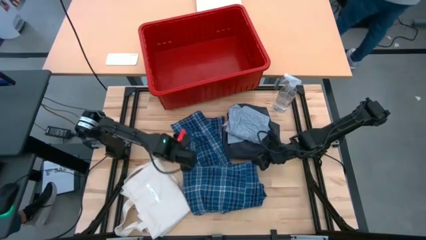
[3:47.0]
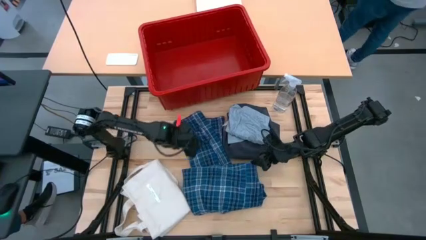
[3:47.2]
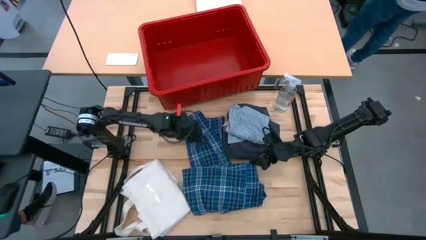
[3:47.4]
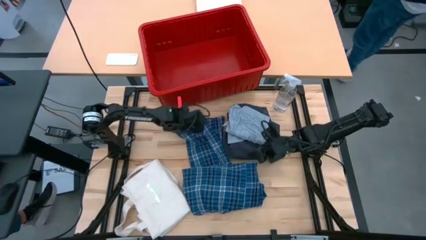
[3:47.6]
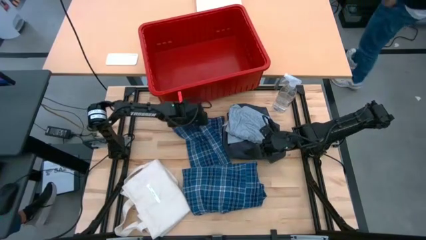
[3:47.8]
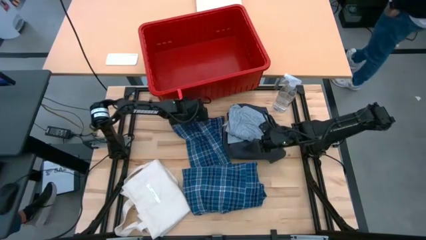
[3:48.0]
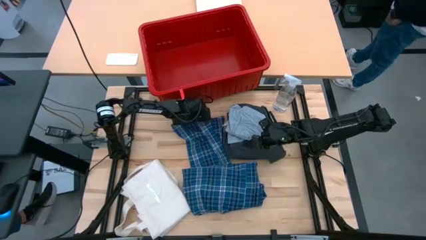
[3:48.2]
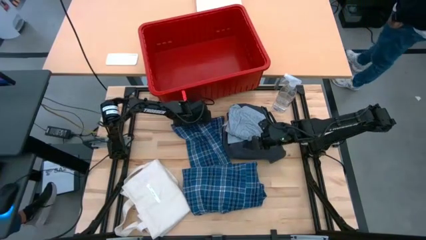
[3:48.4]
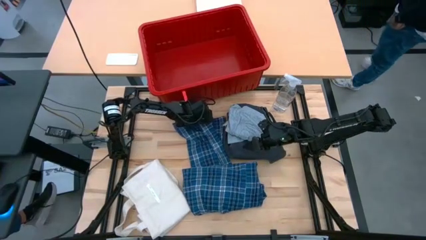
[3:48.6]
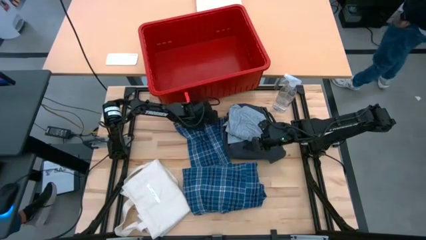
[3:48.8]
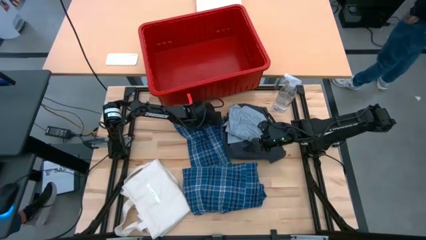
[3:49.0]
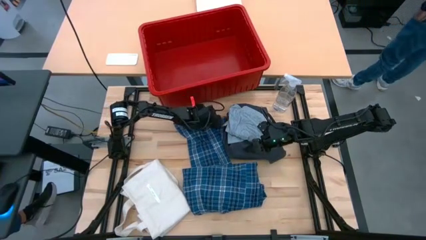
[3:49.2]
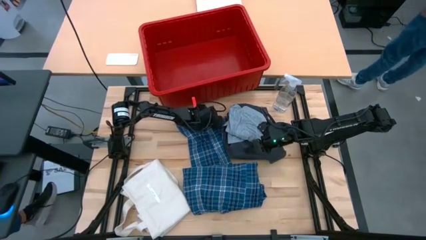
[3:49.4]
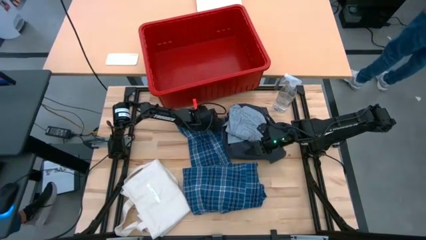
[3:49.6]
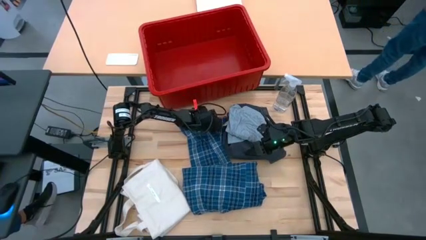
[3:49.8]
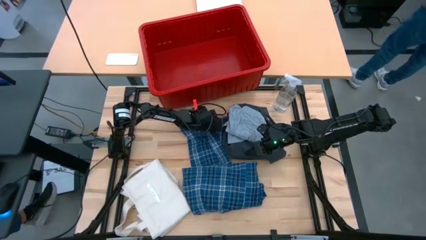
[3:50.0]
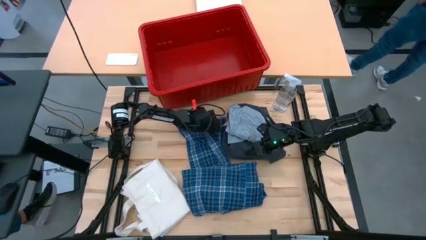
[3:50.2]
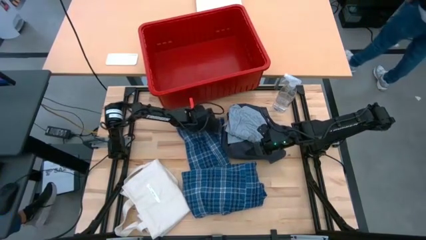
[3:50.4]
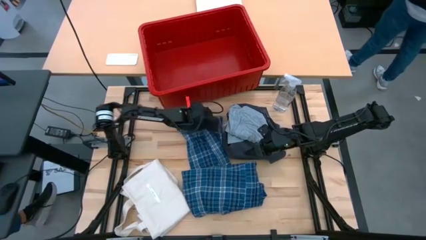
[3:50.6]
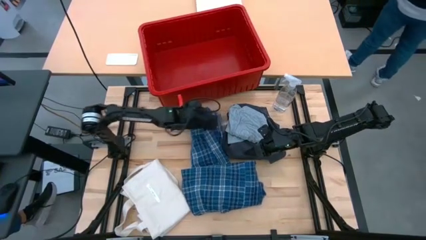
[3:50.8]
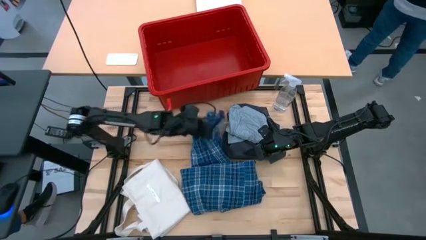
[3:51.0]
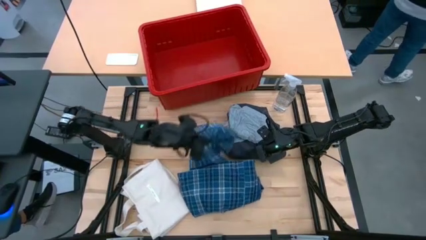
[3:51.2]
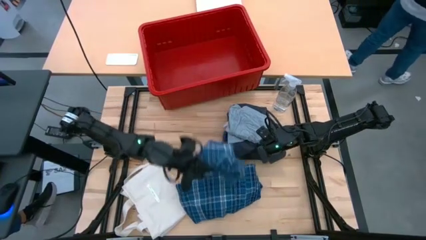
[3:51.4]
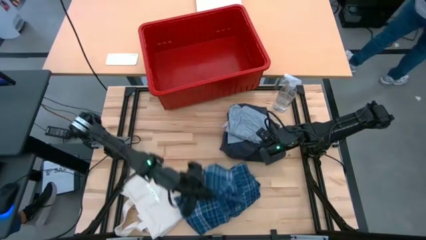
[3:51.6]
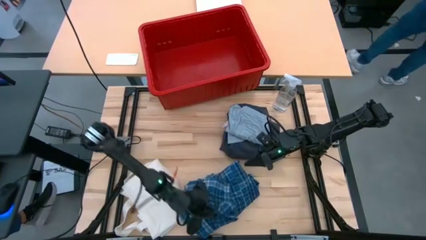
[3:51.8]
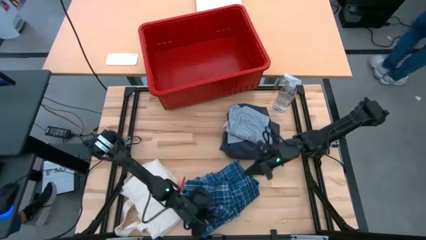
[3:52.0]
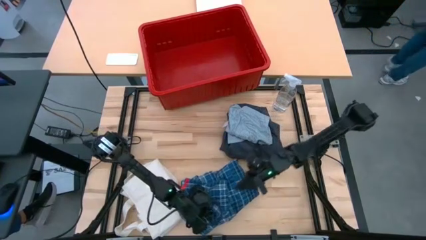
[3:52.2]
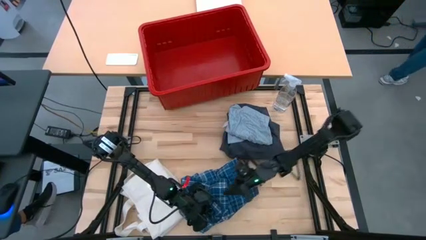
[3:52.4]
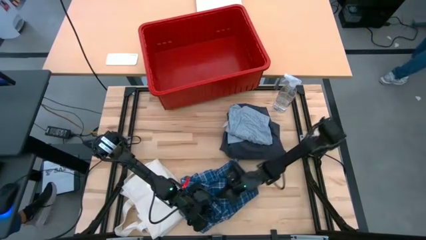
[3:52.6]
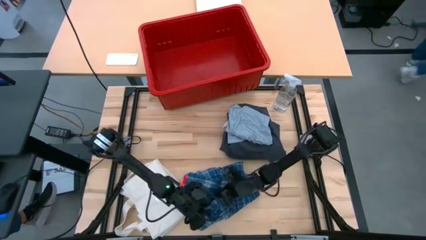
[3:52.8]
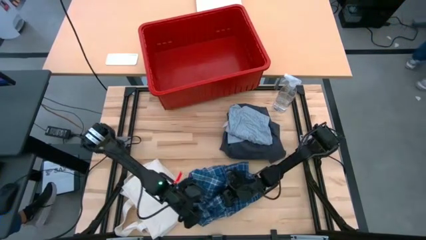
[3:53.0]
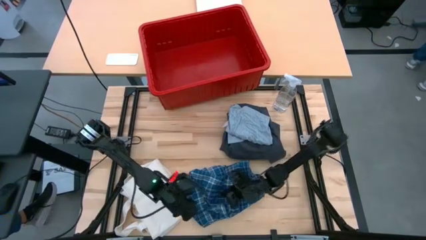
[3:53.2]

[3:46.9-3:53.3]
Task: Fold Laundry from Bin
Fold the blue striped long sleeve

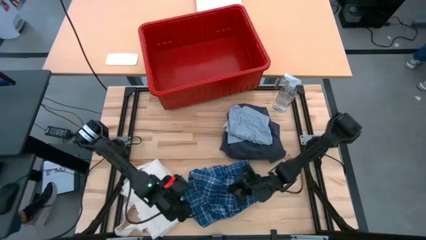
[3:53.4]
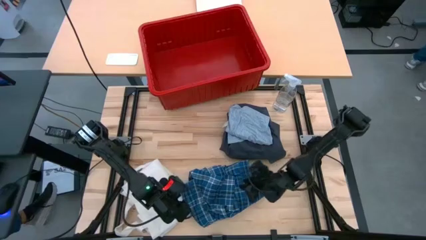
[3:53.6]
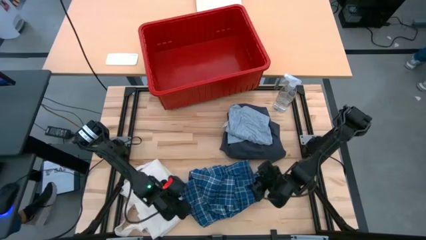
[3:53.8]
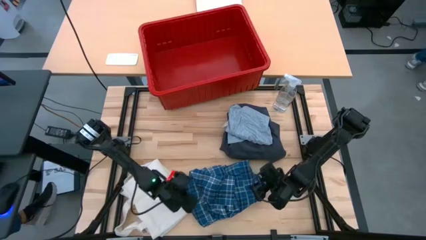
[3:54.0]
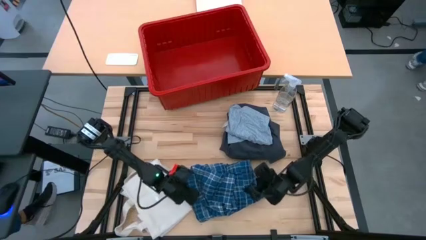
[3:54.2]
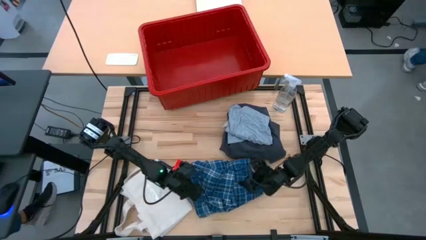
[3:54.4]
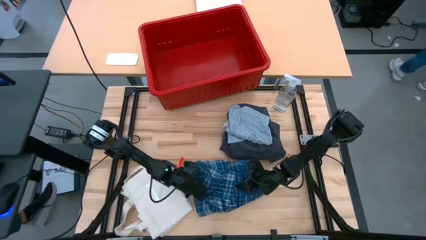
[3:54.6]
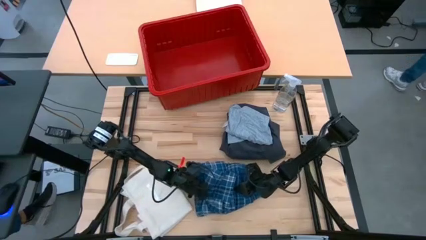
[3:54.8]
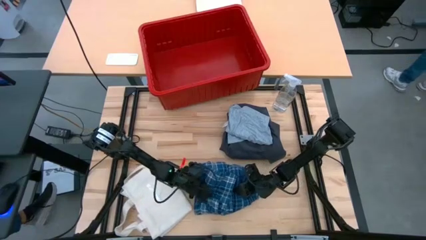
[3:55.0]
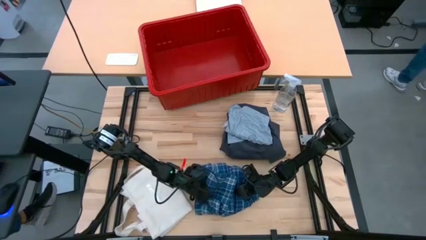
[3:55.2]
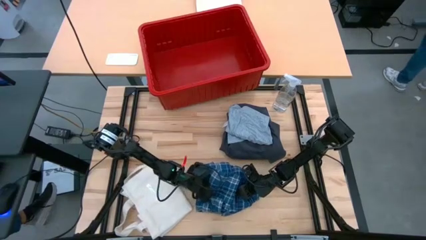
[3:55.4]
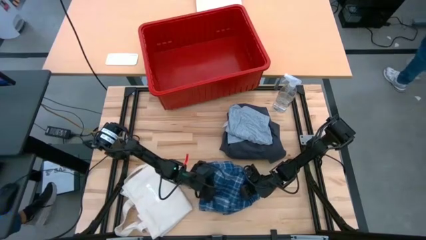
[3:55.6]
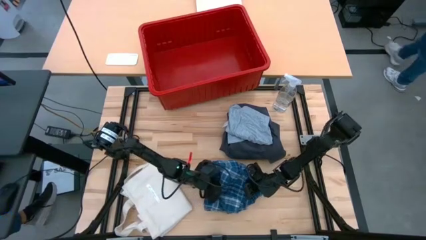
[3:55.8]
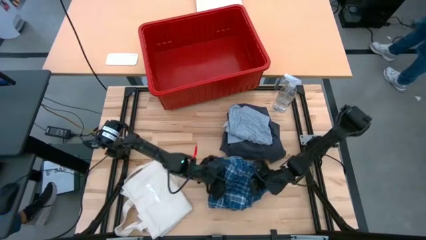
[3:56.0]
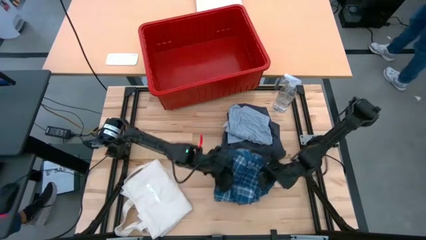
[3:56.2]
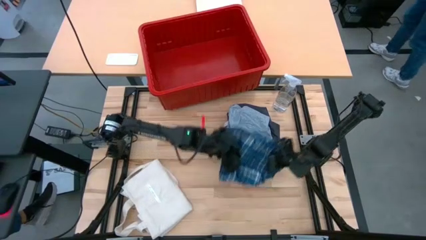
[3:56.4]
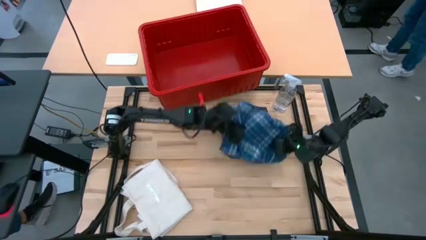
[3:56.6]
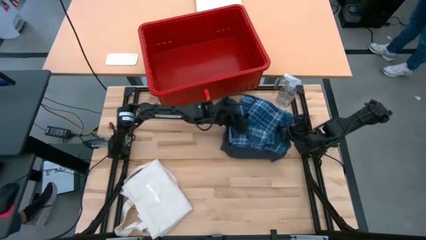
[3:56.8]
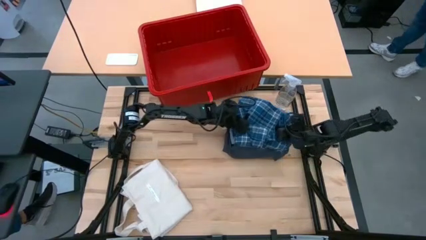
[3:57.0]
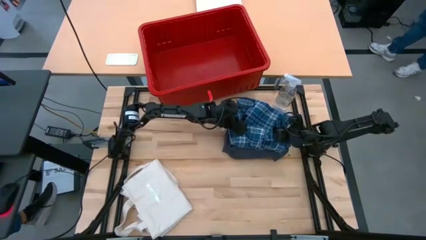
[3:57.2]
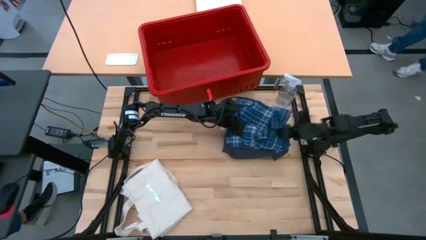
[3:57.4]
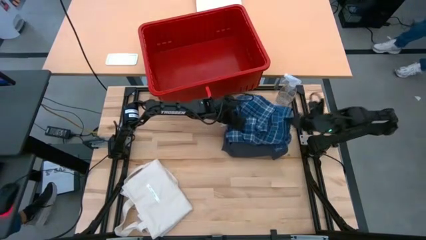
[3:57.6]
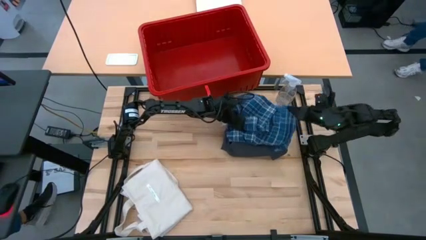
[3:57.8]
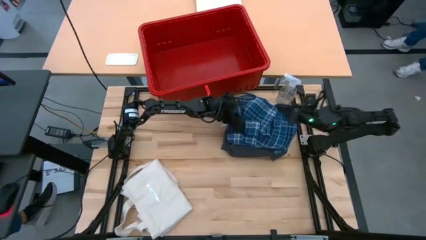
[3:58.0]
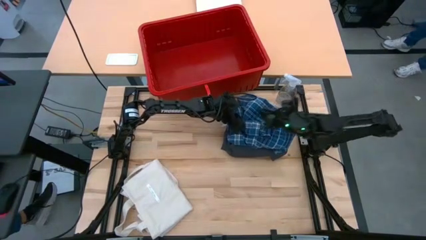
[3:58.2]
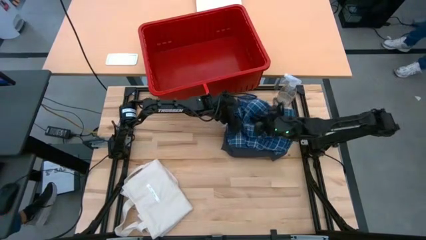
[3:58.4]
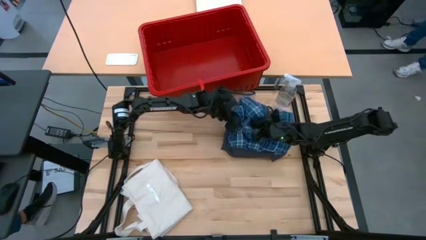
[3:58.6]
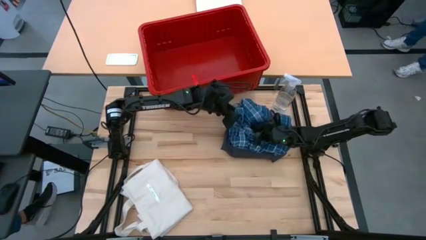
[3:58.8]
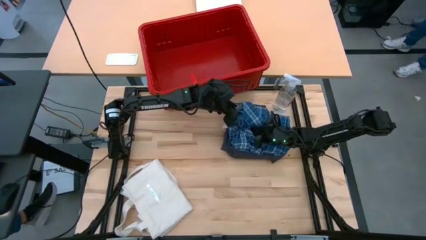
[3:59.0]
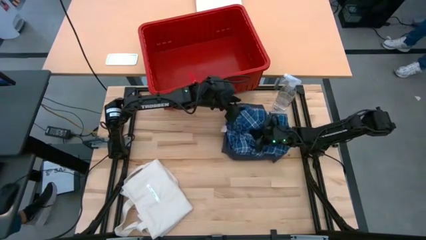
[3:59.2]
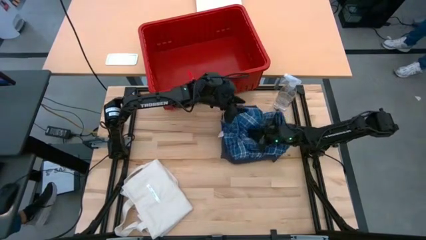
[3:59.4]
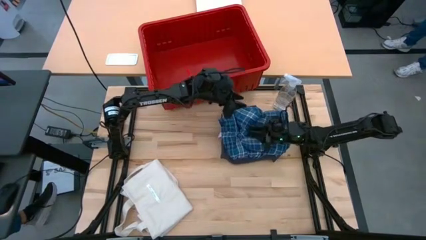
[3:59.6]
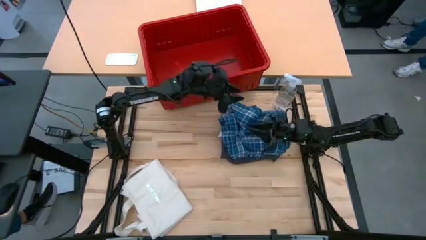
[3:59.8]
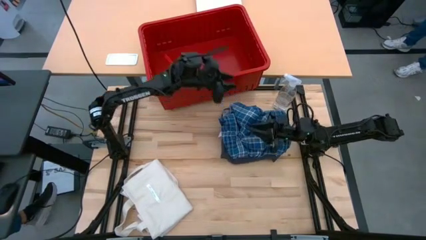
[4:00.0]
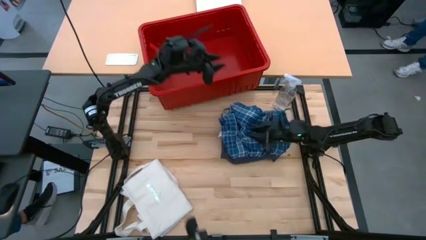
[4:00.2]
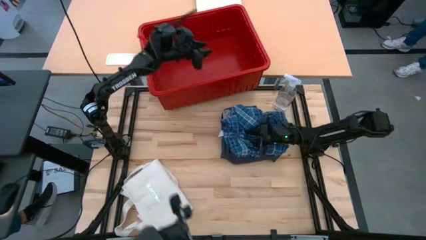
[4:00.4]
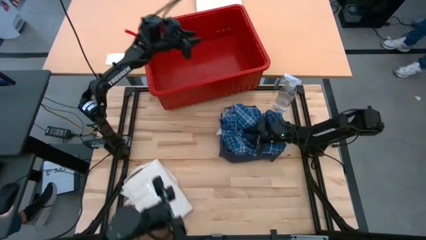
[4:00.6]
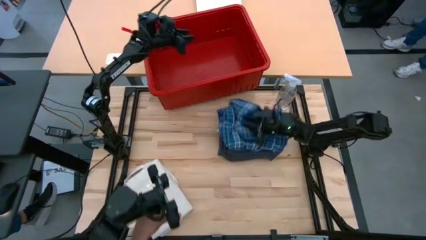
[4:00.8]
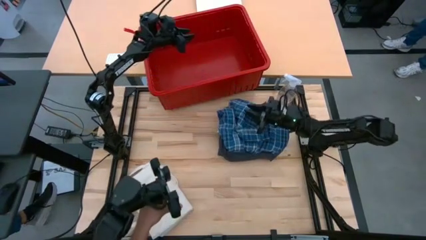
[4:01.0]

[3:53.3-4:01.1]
Stack the folded blue striped long sleeve on top of the folded gray shirt

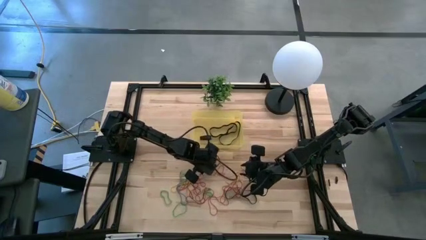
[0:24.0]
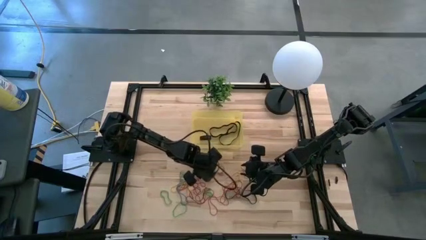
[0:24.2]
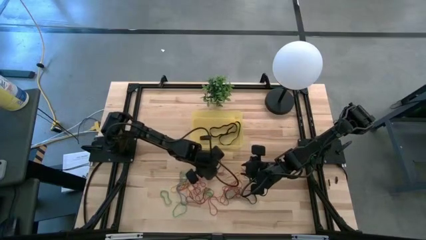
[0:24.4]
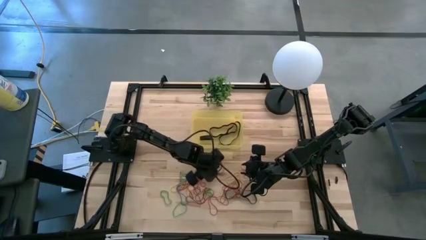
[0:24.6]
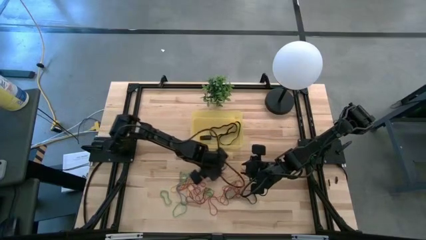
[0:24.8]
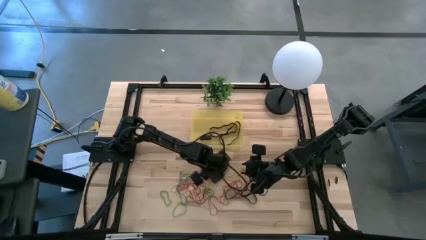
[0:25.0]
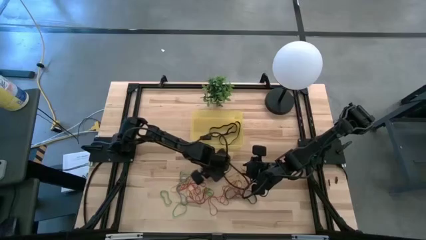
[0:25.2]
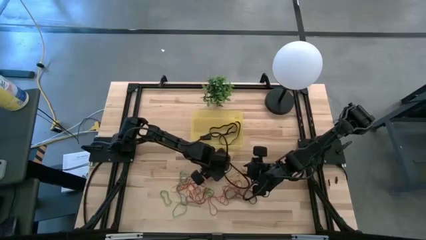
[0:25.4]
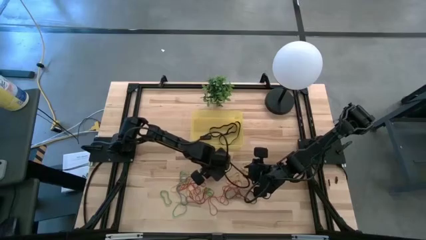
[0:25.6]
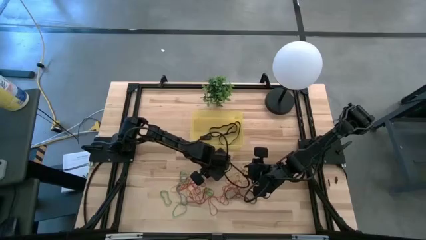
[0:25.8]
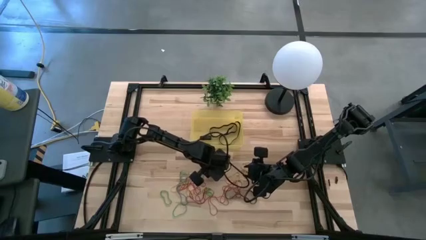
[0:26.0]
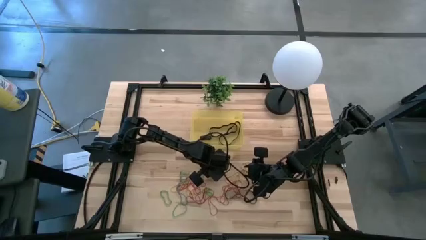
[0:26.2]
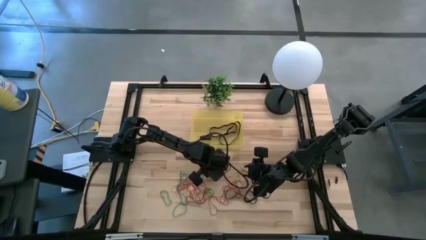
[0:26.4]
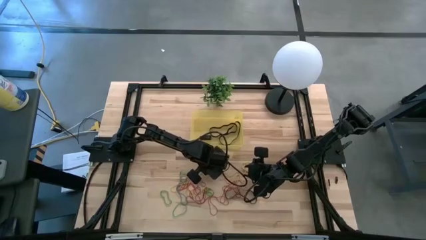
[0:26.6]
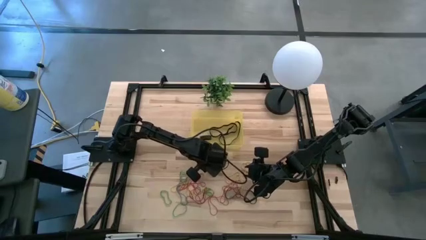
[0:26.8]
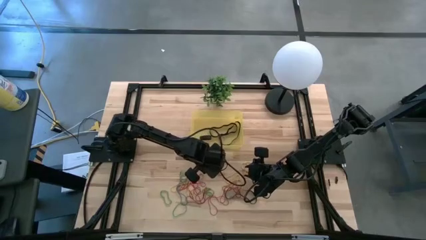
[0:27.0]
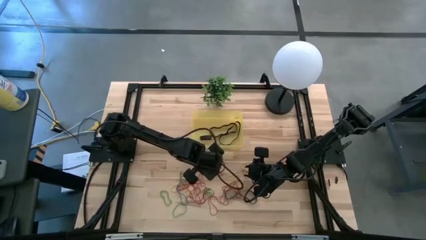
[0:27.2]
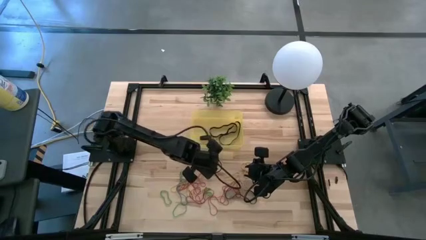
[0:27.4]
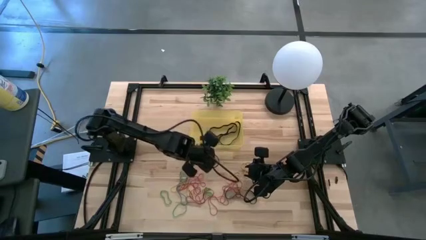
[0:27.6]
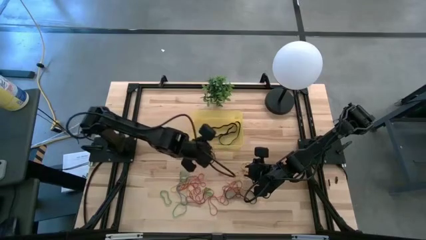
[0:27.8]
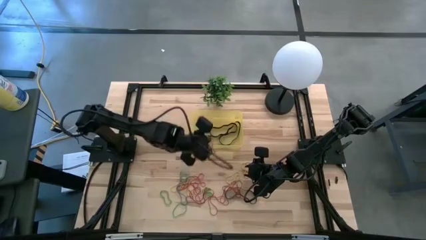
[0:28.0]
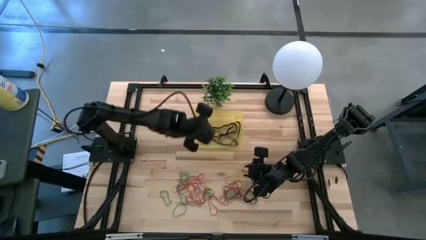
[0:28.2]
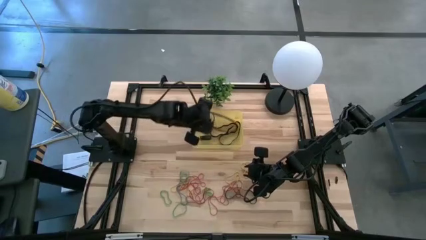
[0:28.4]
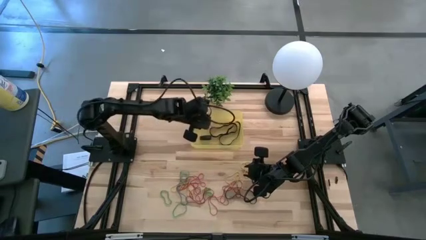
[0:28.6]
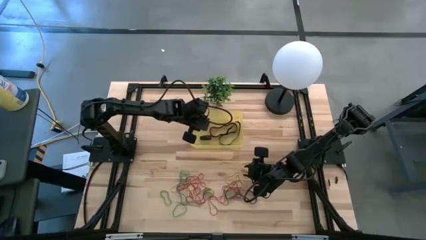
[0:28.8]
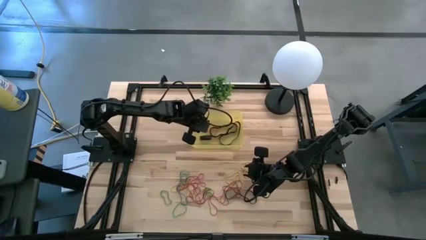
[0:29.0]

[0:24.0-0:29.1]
Task: Pick and place rubber bands into bin
Put the red rubber band into the yellow bin
